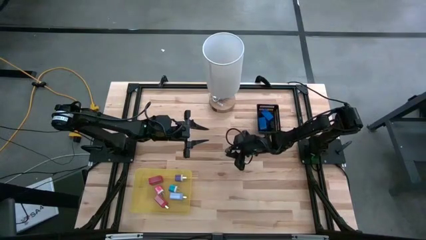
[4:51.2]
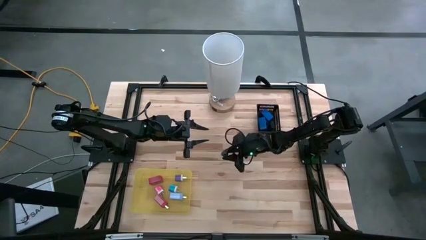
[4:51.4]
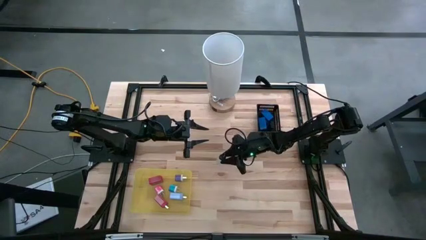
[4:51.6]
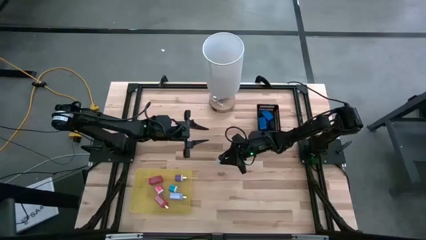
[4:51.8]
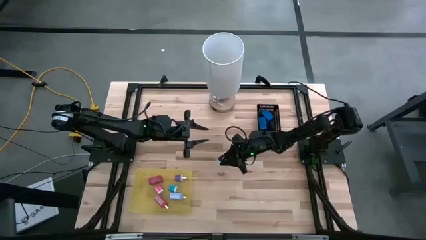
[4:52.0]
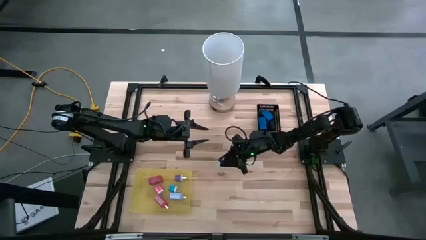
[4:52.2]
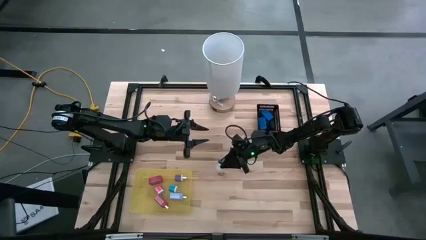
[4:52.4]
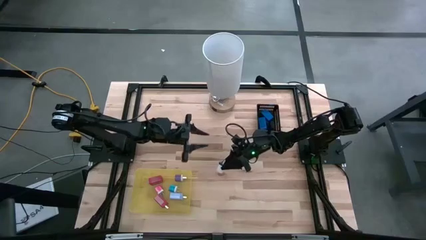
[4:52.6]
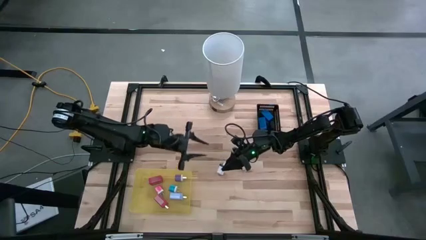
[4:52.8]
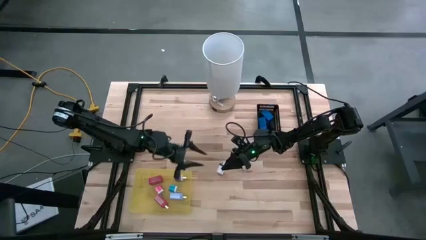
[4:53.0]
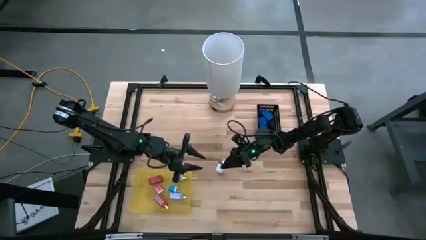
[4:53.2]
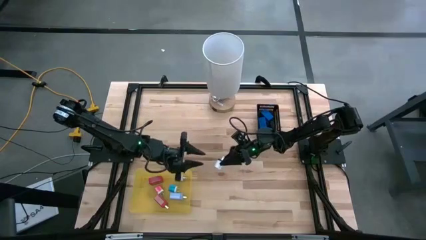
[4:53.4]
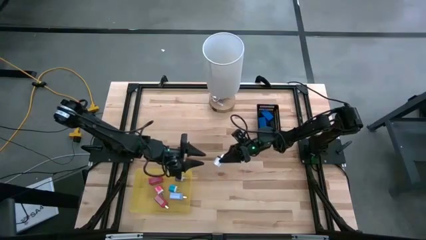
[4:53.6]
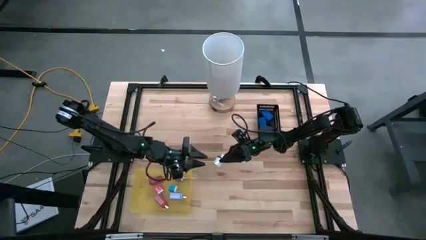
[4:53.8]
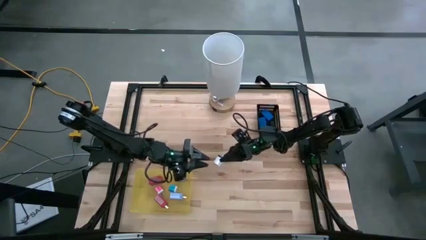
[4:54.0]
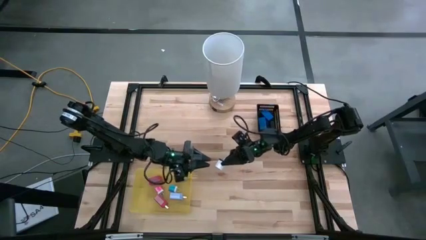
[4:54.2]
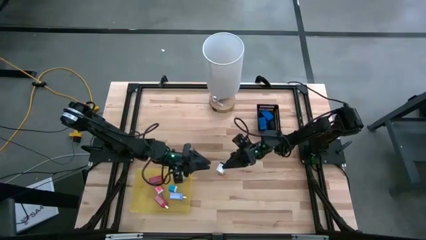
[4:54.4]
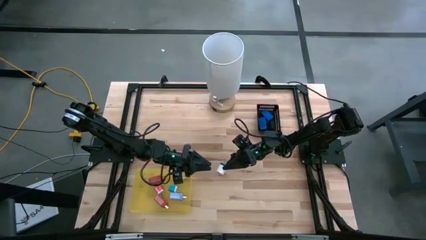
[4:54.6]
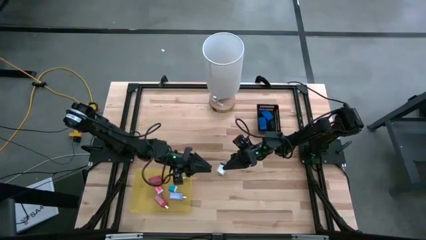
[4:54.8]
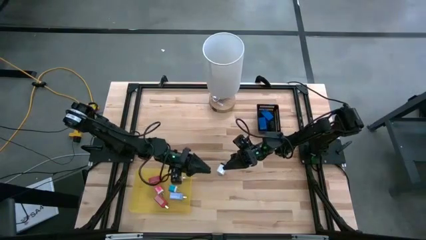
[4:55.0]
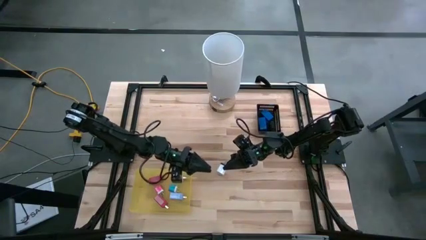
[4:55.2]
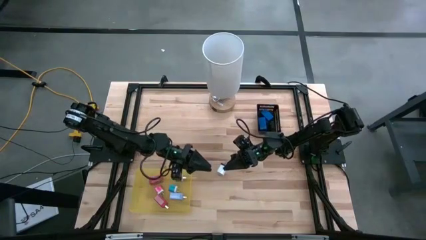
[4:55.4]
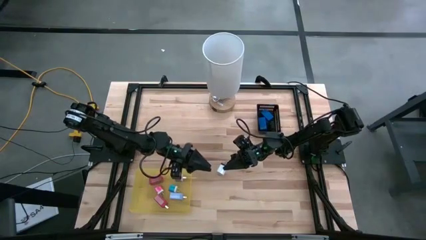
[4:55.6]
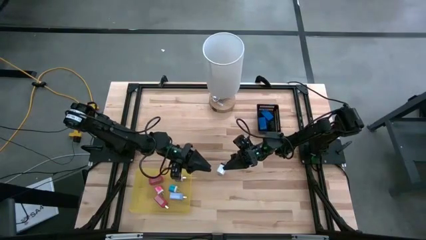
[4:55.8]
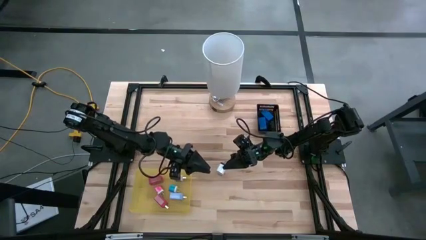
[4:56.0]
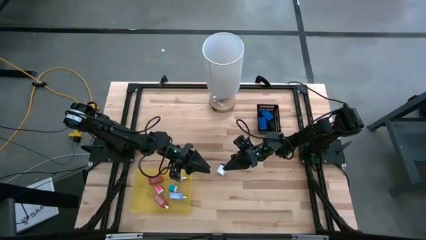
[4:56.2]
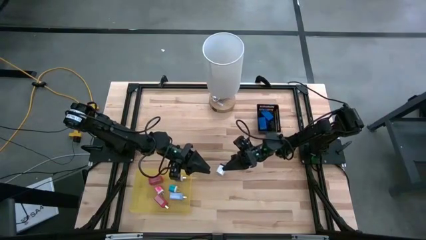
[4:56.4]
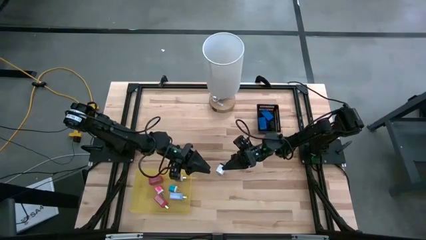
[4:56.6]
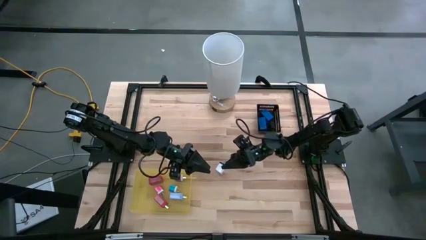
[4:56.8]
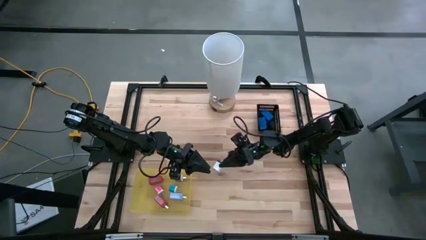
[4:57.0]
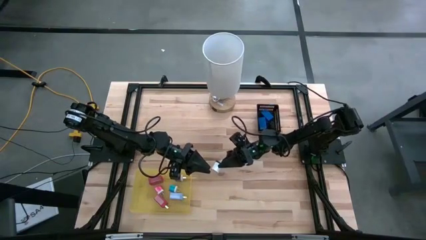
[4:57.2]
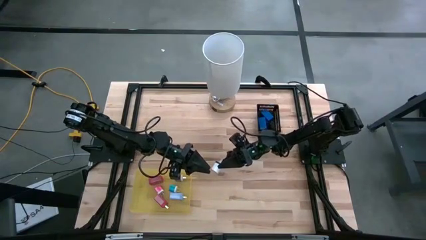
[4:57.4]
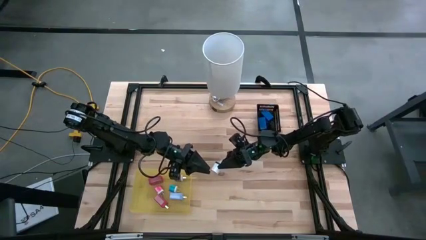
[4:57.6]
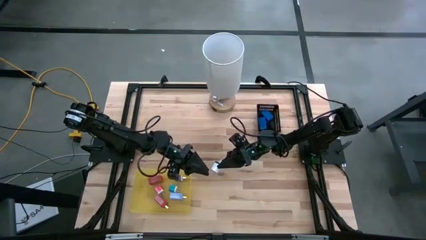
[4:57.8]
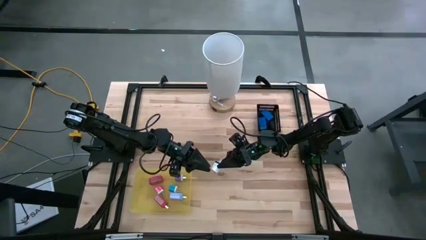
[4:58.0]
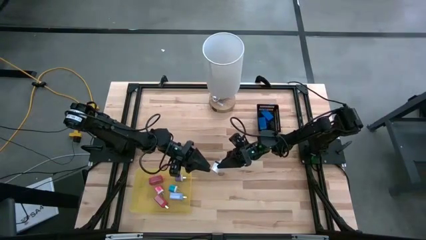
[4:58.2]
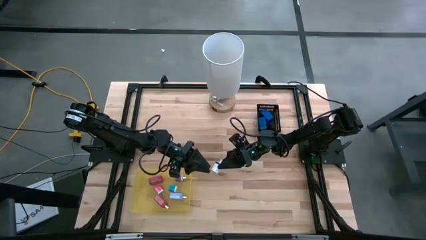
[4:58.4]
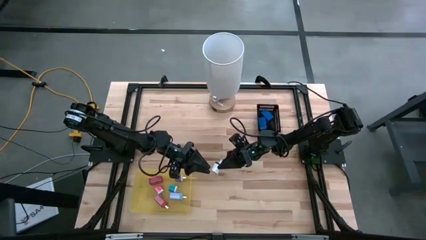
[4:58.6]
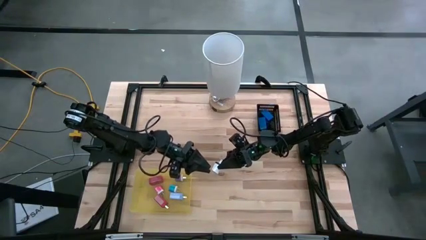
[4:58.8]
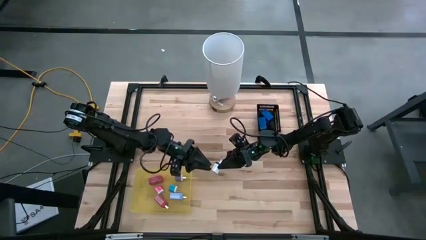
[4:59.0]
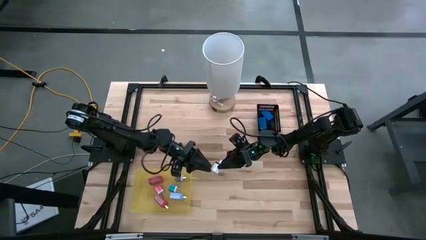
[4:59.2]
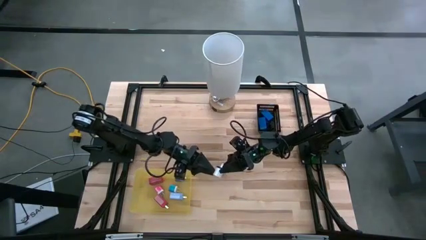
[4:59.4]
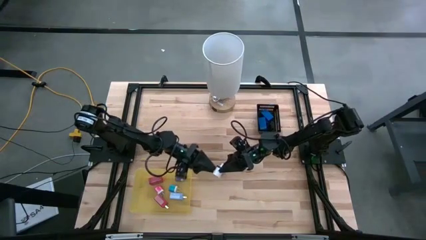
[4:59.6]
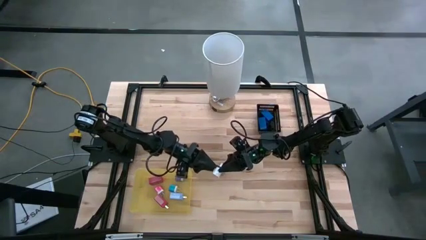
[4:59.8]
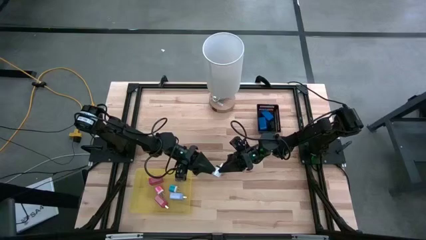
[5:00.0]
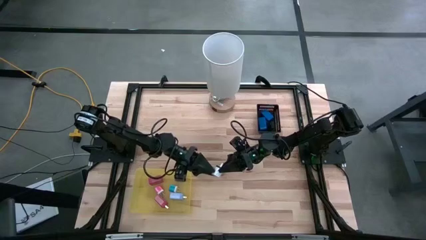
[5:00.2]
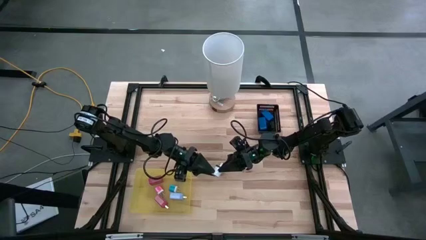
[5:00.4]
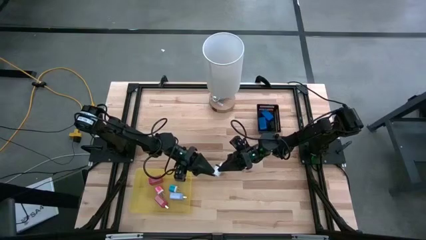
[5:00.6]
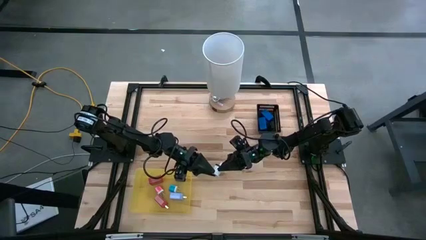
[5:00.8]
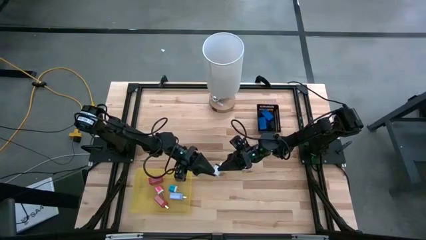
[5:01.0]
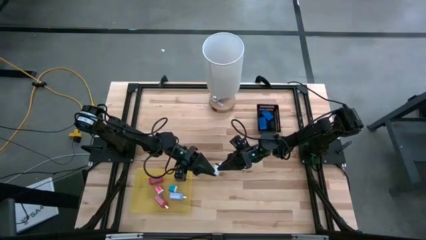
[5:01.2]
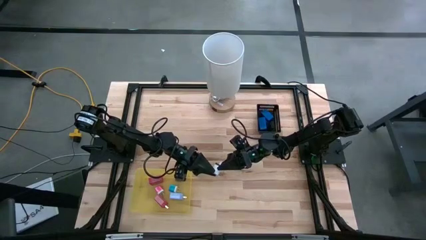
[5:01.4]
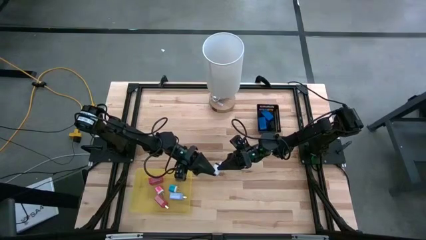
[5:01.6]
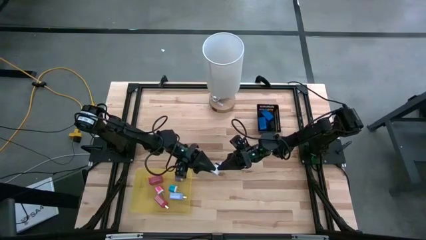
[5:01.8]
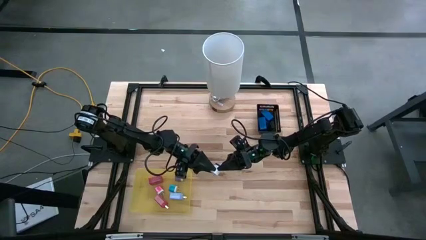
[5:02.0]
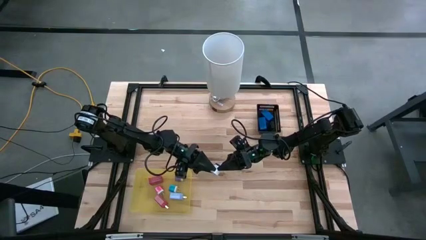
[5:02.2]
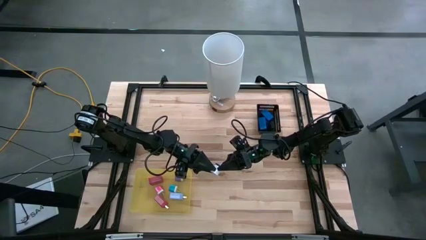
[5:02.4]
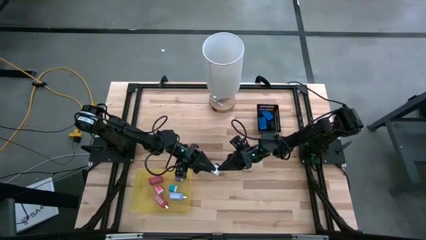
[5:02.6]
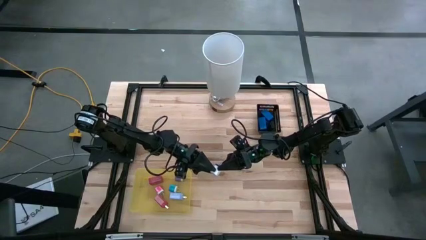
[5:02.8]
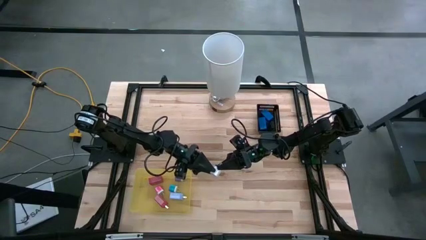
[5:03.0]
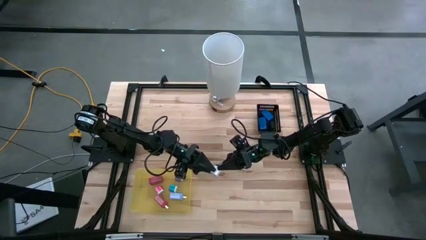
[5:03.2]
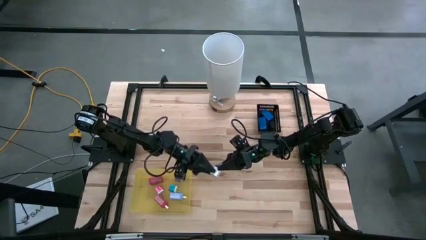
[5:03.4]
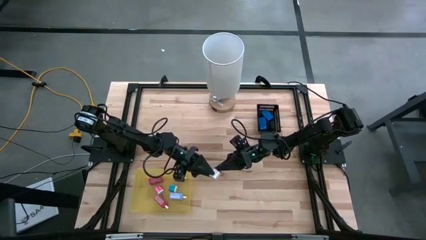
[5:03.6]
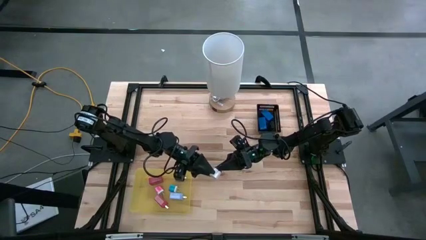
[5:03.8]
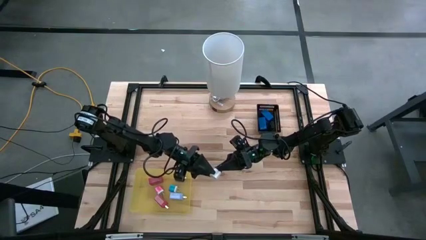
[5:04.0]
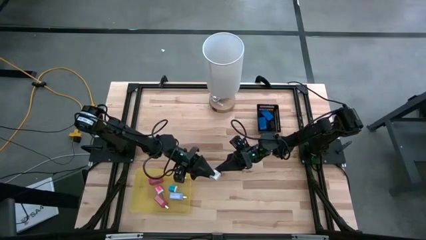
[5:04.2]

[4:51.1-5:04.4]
Task: Pick & Place Office items
Put the white charger adapter into the yellow bin

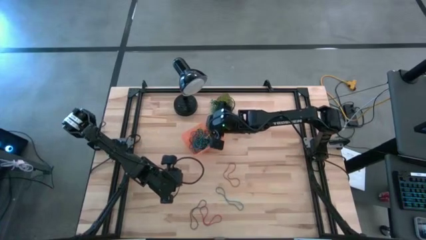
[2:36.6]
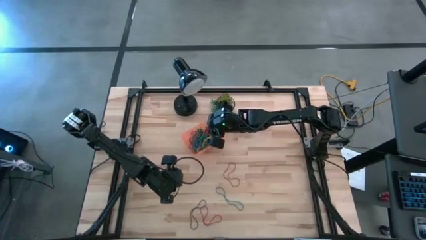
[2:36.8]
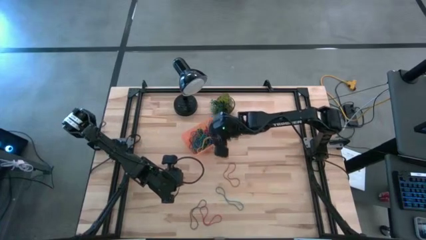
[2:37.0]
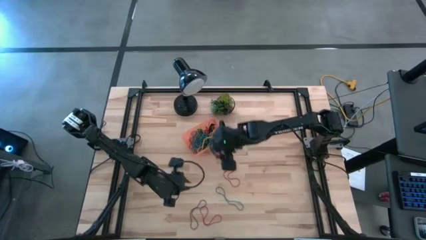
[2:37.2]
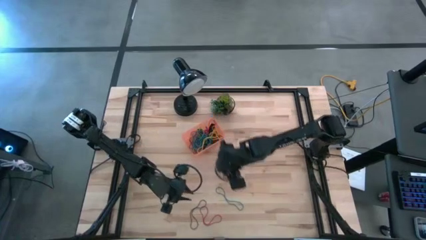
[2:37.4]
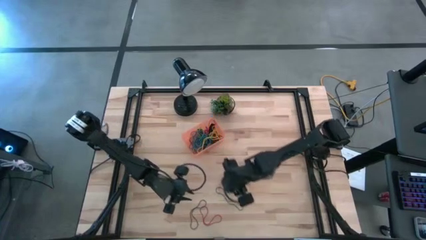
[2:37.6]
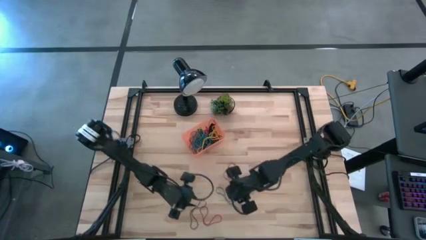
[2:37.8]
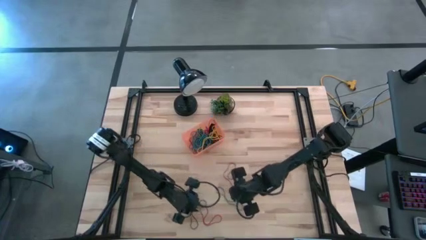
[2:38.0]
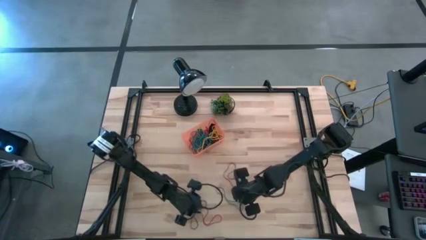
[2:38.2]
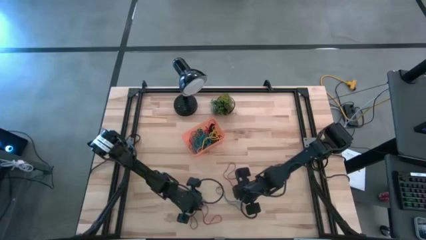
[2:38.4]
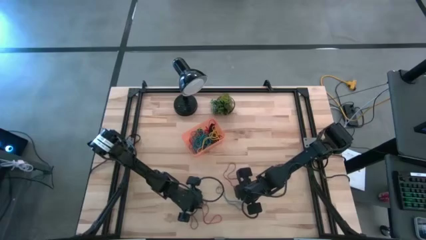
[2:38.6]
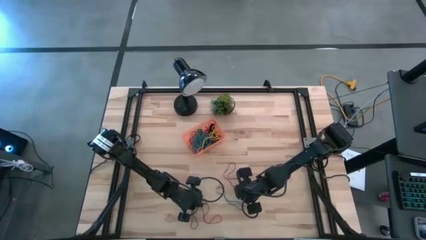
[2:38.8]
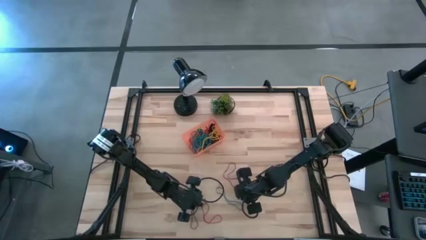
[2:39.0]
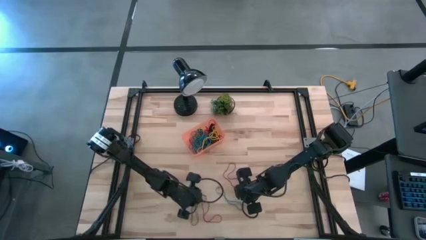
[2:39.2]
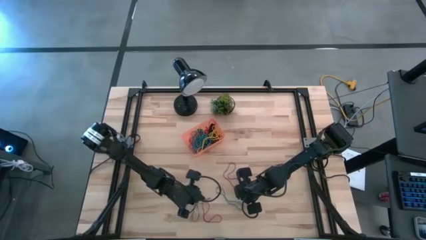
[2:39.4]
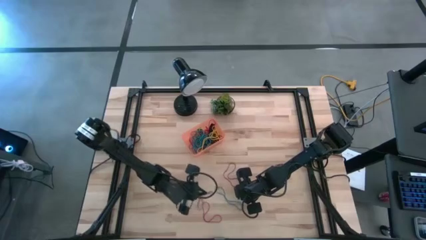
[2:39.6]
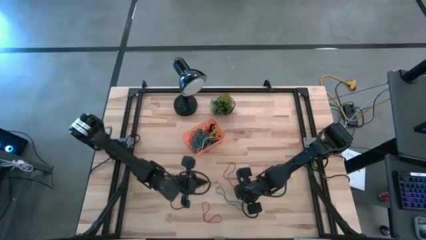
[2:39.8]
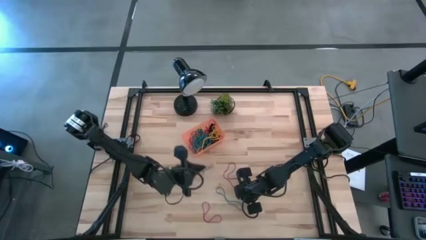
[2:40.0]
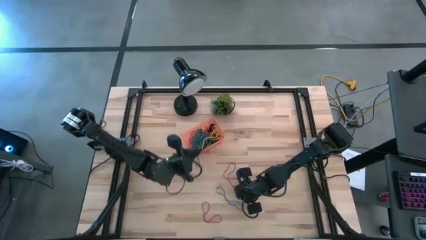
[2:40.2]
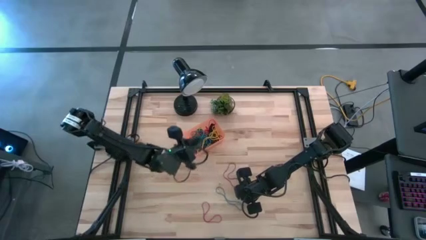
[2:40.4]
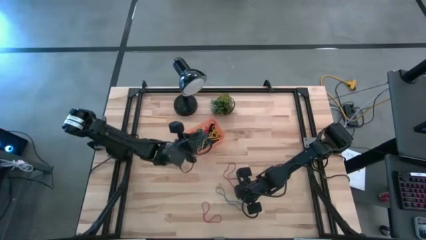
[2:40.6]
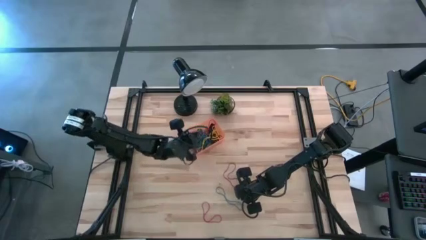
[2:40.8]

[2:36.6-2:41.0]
Task: Pick and place rubber bands into bin
Put the violet rubberband into the orange bin
